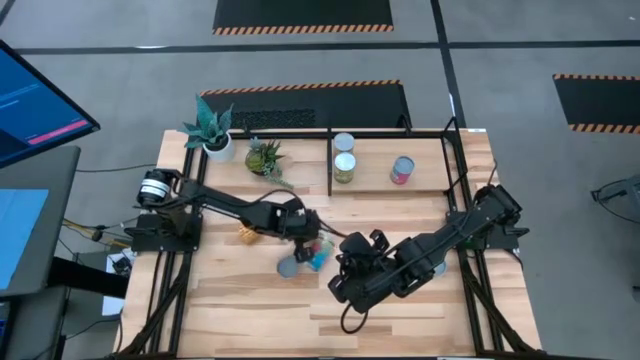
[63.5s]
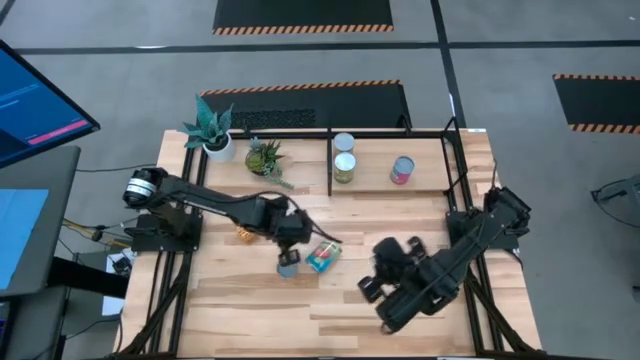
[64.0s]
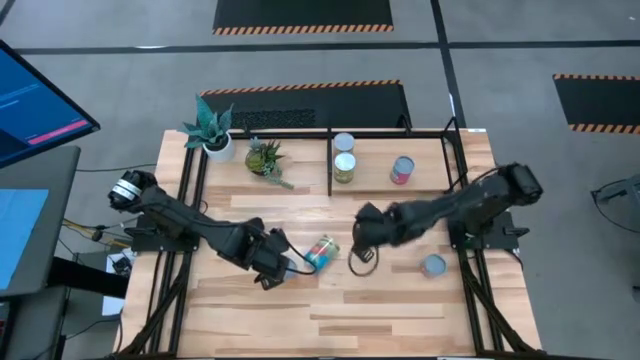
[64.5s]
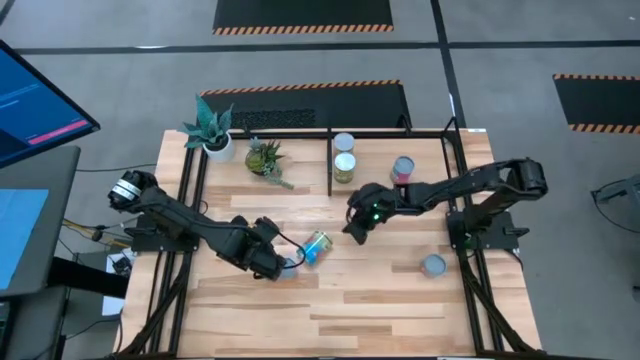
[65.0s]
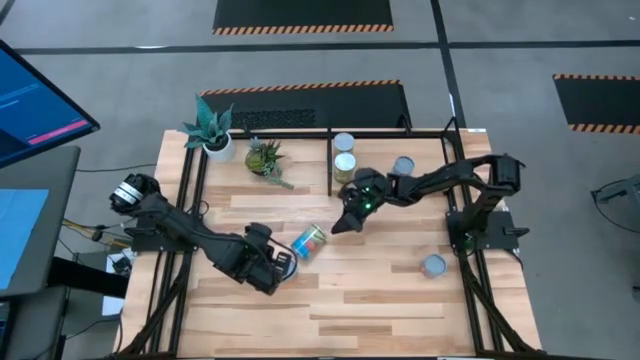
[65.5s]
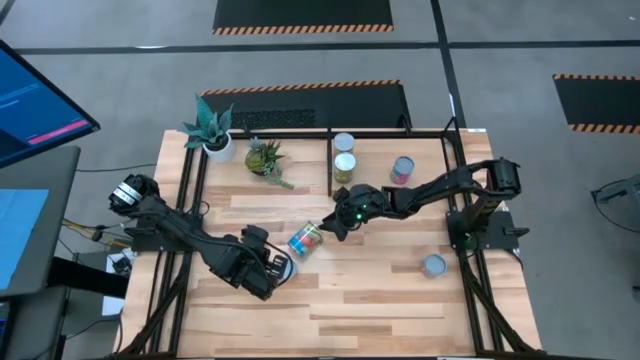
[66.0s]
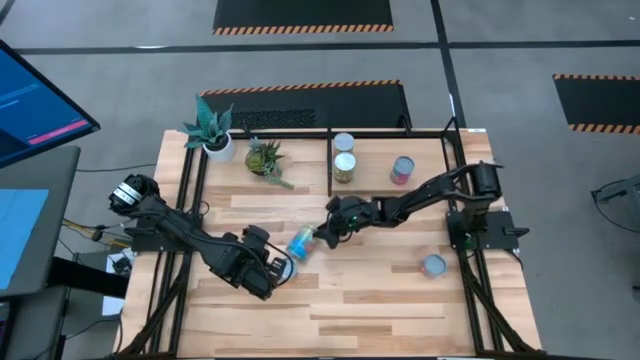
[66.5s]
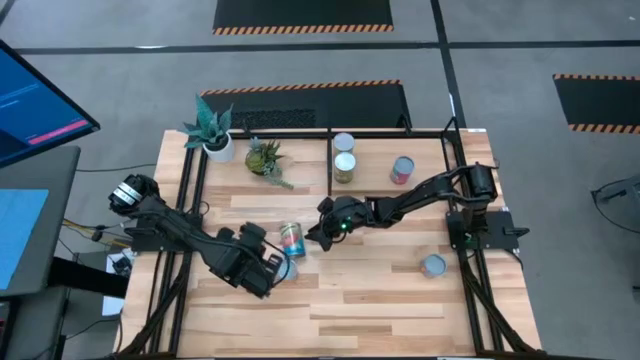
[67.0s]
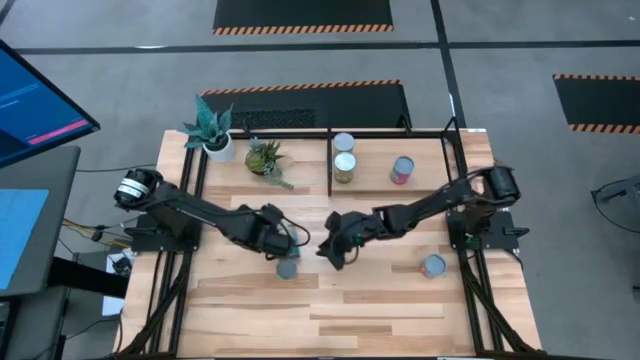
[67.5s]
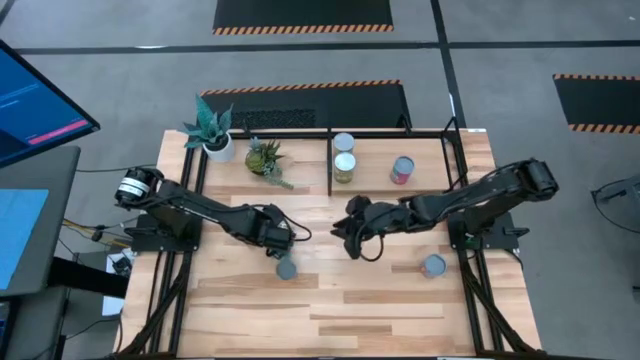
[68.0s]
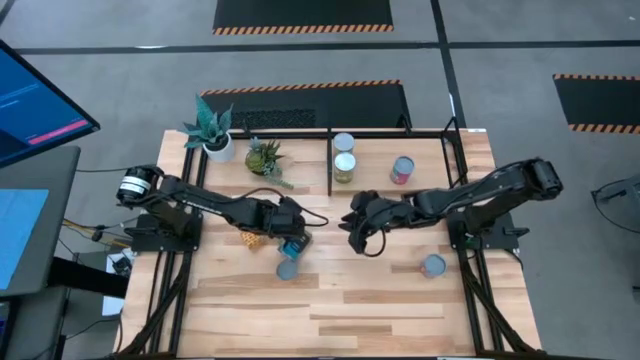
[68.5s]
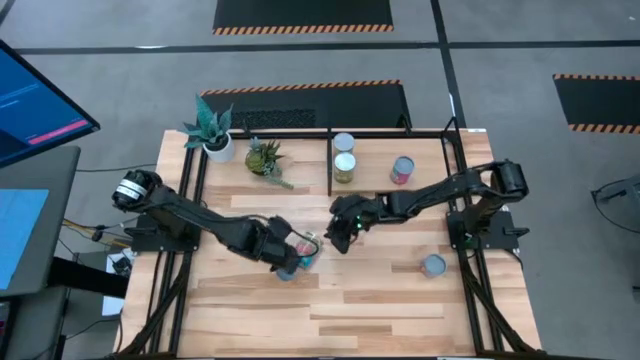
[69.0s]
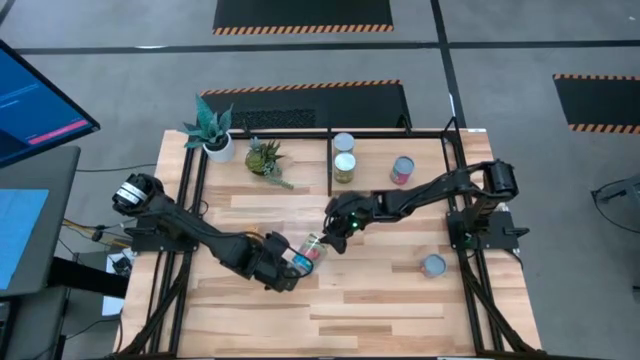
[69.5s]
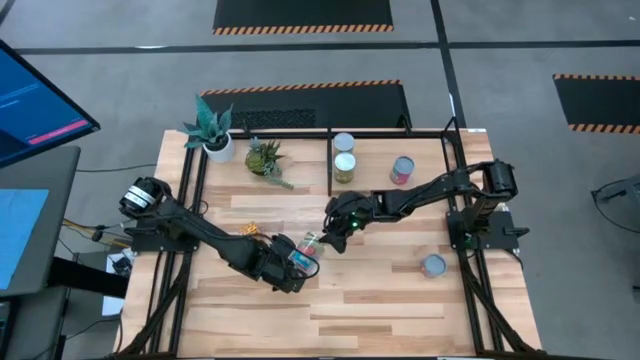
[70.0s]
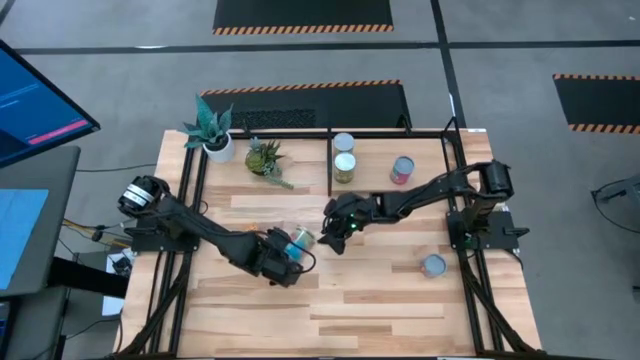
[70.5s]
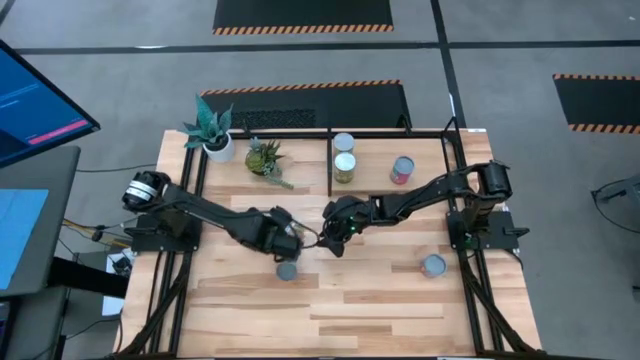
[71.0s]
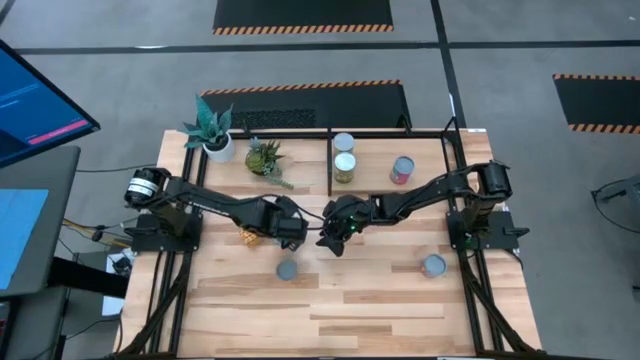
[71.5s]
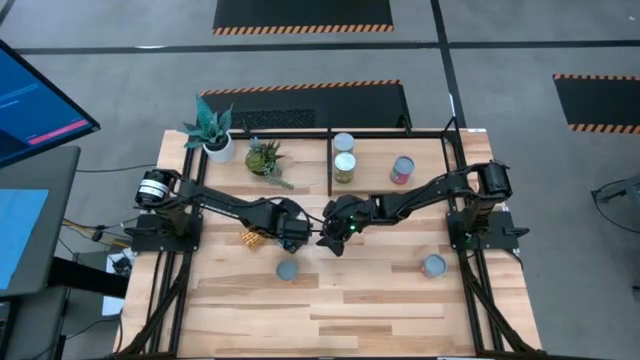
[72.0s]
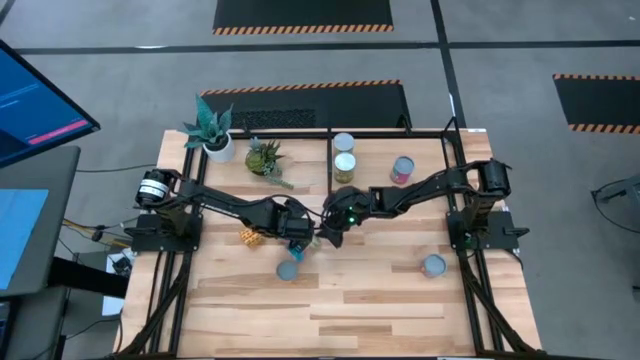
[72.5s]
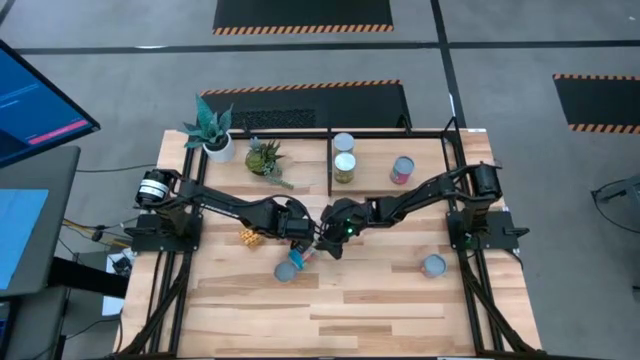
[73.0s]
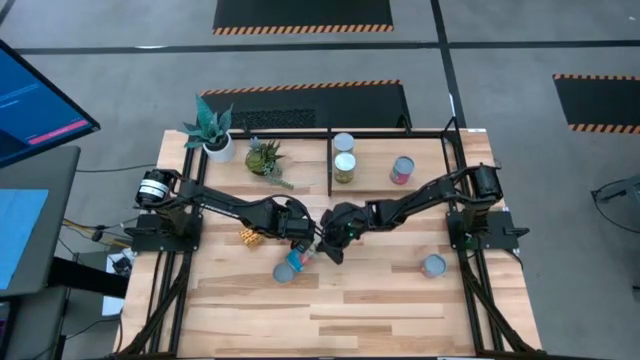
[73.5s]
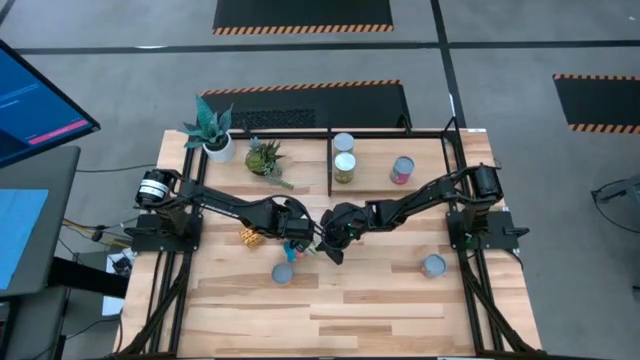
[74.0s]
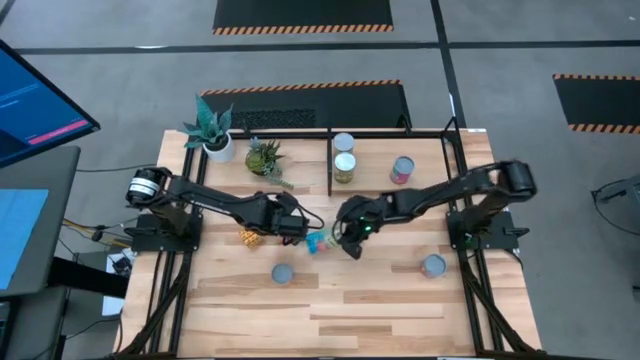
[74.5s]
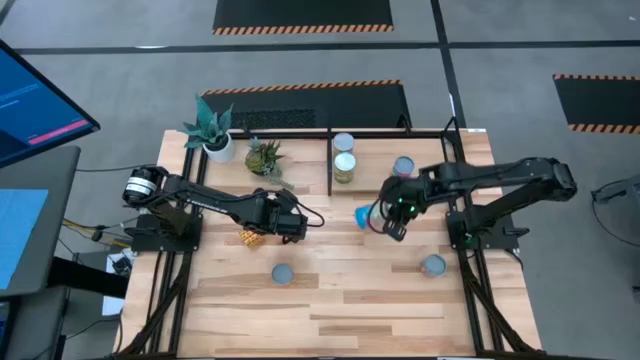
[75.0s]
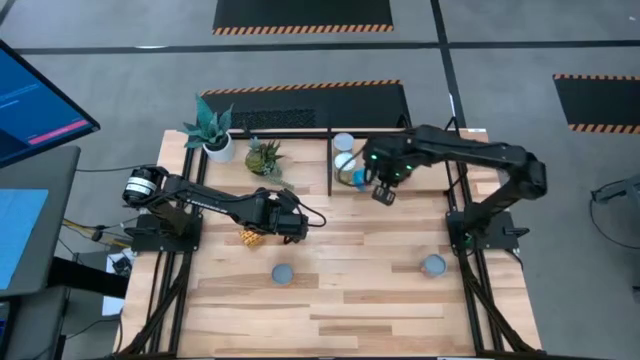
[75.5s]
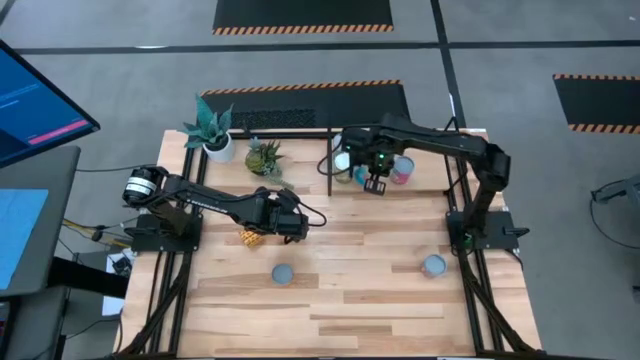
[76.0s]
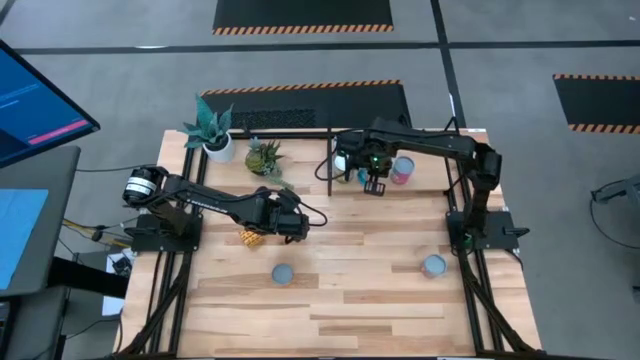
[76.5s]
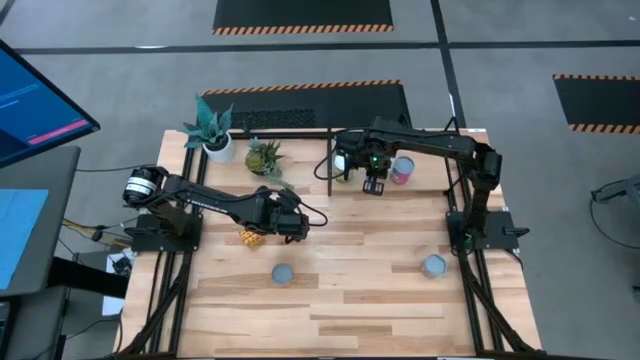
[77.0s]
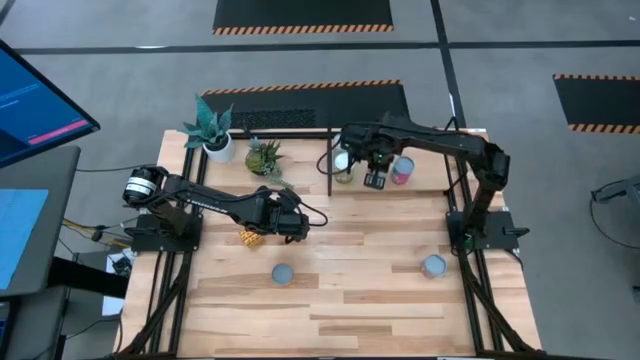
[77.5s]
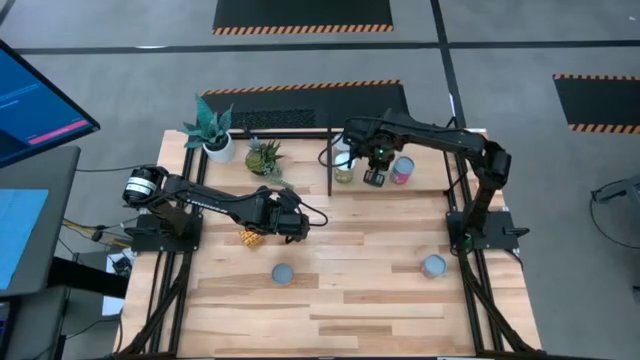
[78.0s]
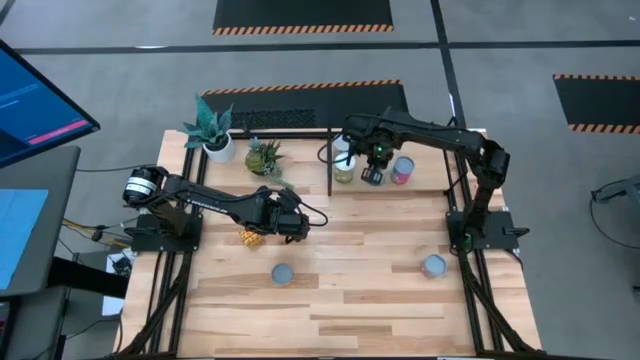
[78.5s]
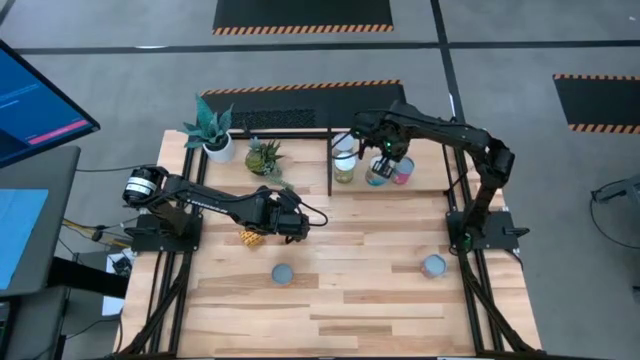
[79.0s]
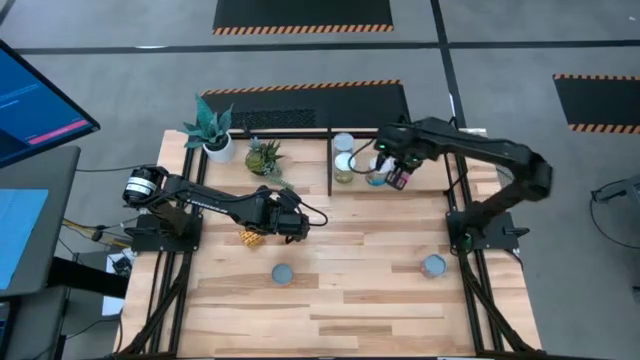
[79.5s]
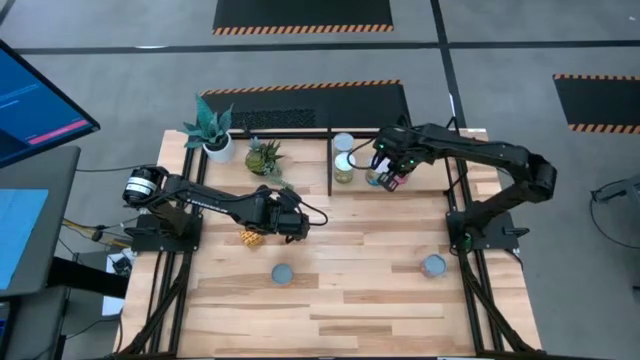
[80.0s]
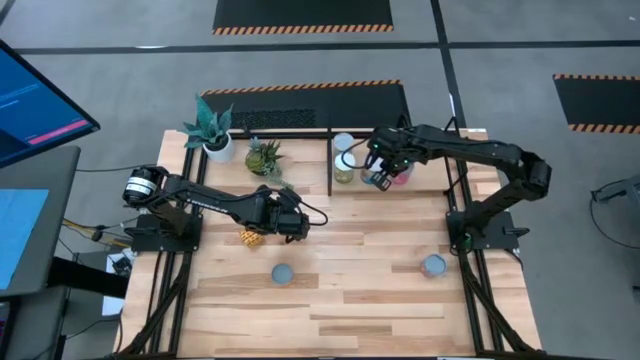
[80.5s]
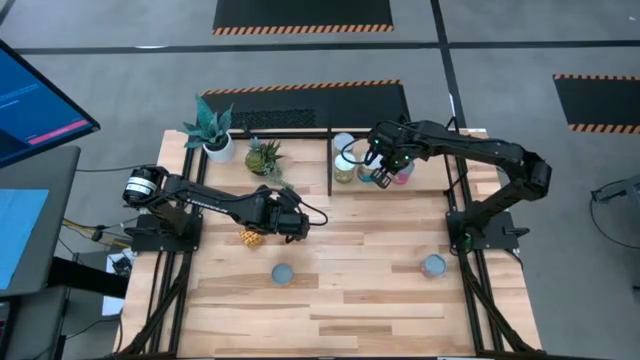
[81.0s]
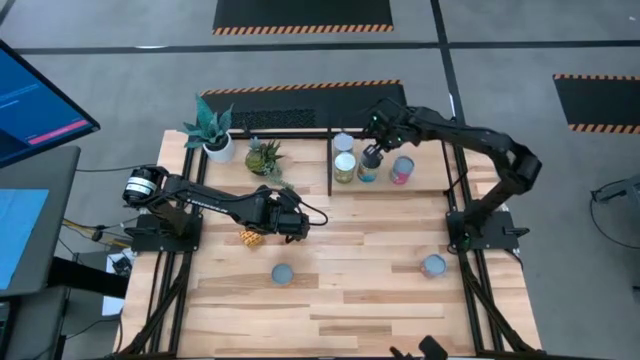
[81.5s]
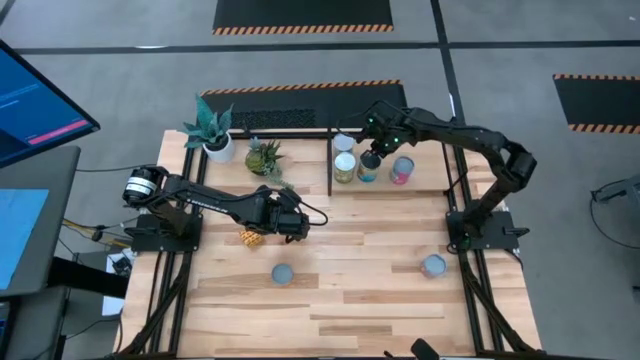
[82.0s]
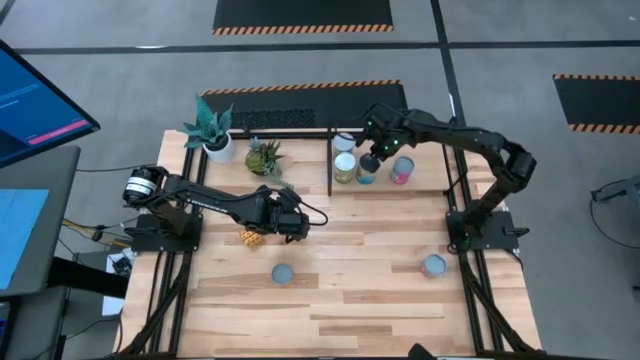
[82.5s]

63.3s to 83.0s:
Task: Pick and place cans onto a shelf
Put the canned tomatoes on the shelf

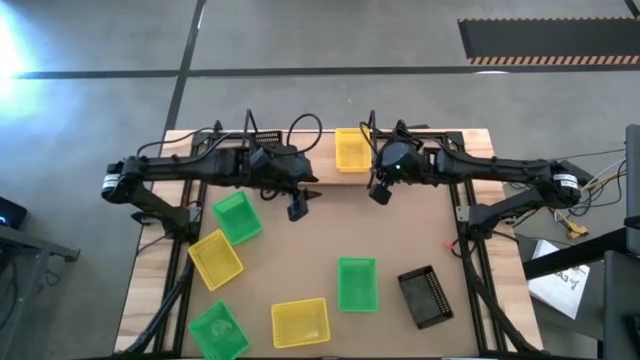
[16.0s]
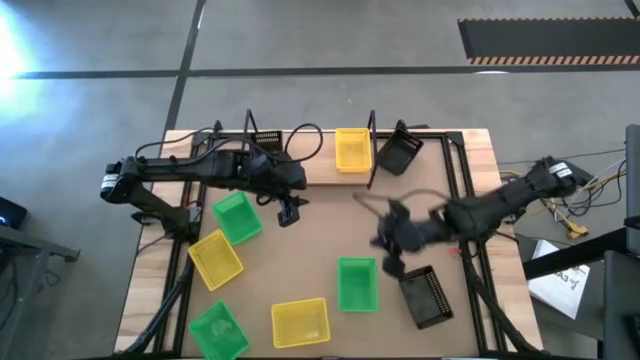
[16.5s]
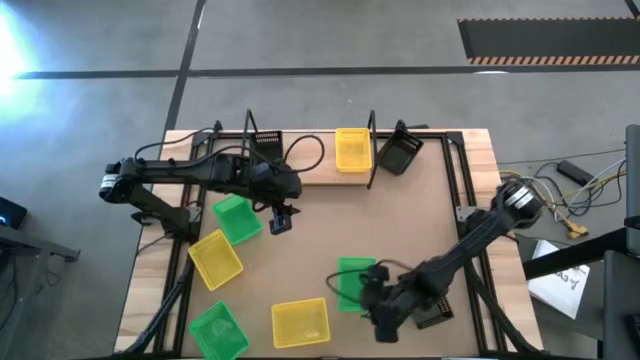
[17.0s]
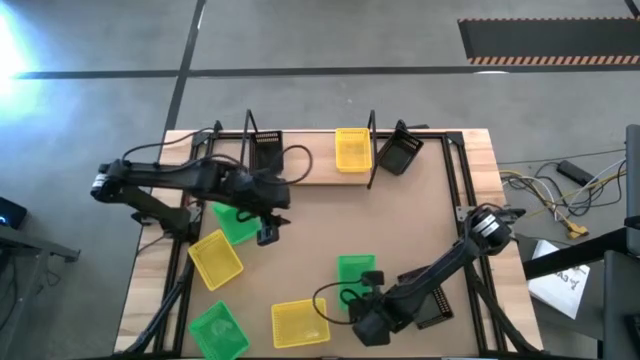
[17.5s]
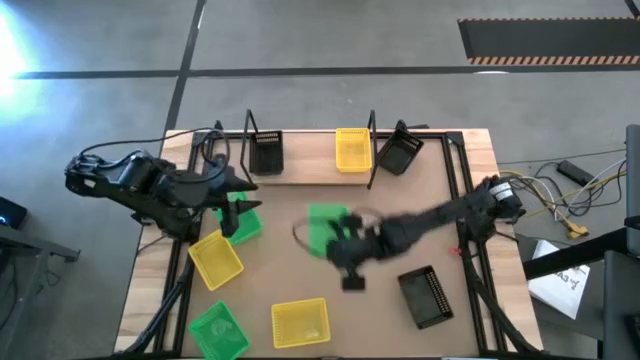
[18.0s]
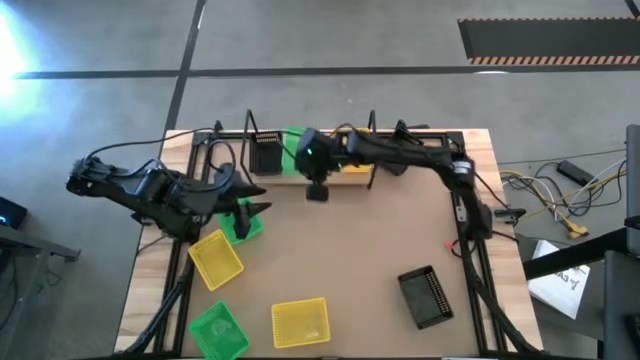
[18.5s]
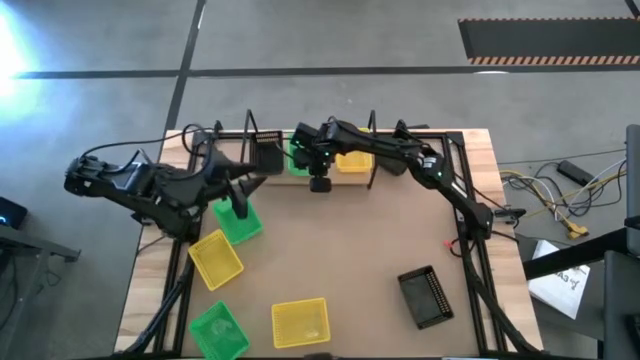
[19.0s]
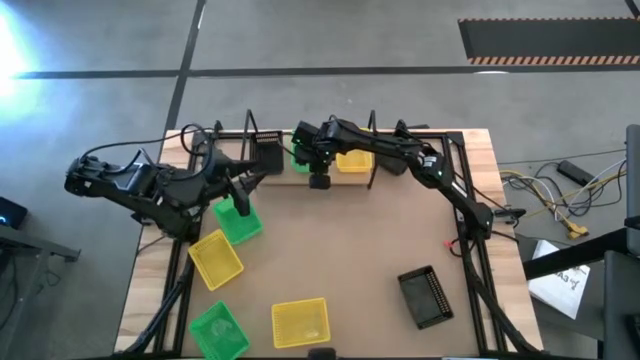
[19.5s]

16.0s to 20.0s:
Task: Stack baskets on shelf by color
Put the right green basket on the shelf
